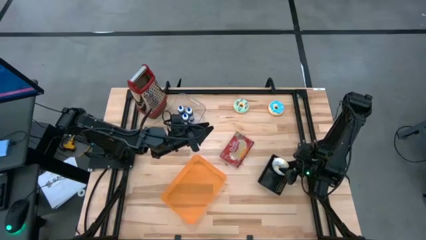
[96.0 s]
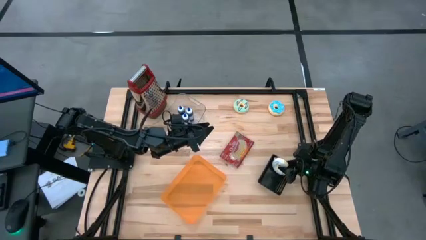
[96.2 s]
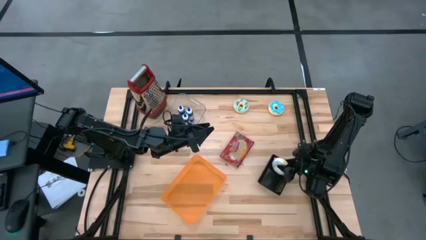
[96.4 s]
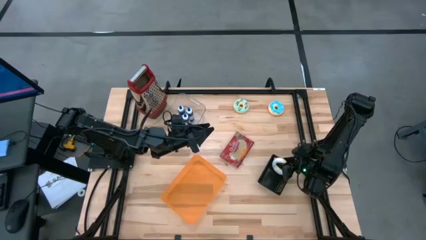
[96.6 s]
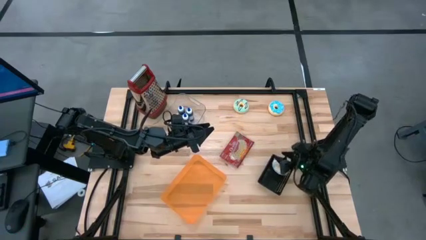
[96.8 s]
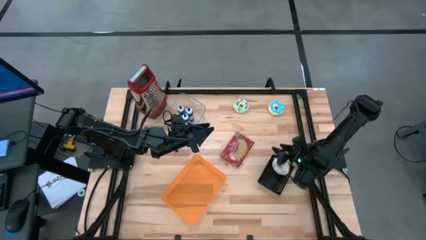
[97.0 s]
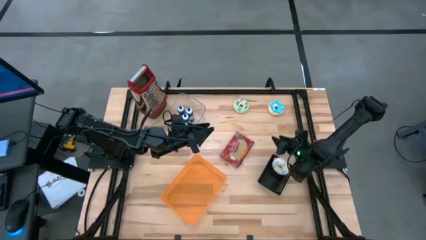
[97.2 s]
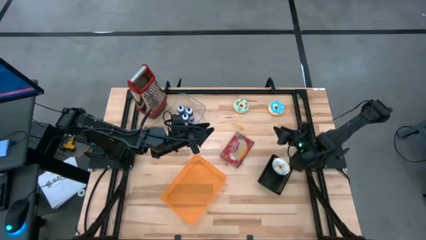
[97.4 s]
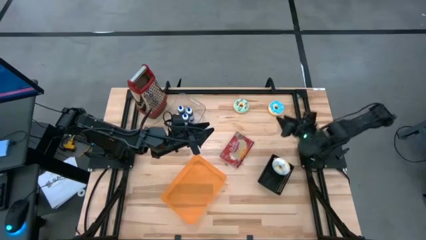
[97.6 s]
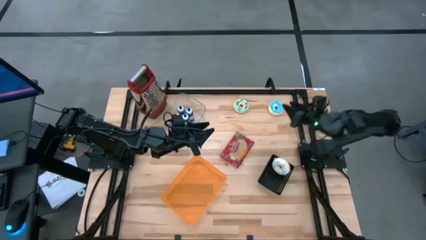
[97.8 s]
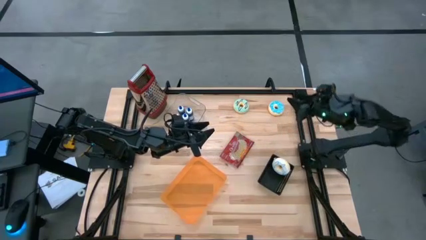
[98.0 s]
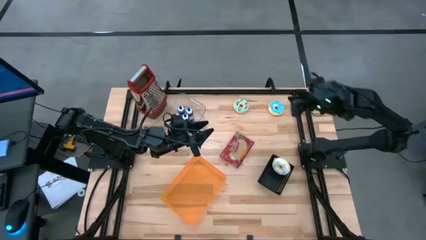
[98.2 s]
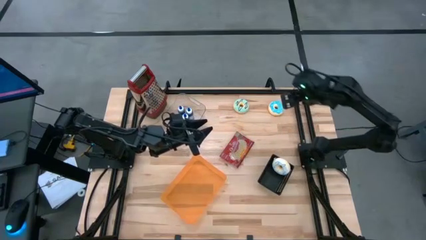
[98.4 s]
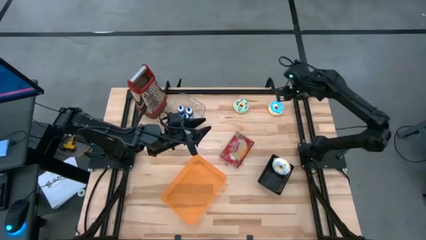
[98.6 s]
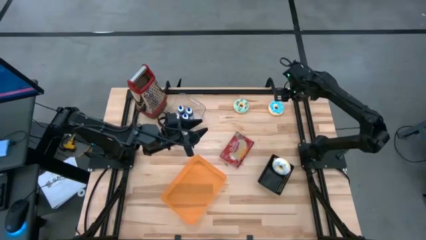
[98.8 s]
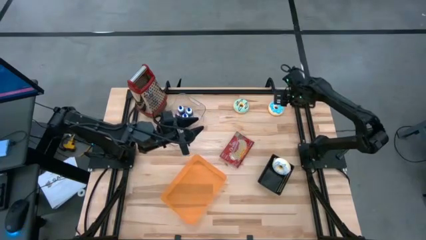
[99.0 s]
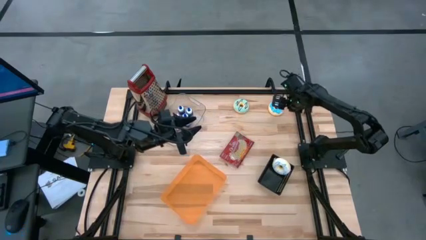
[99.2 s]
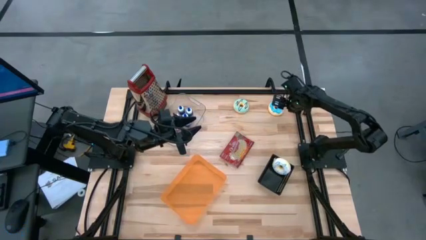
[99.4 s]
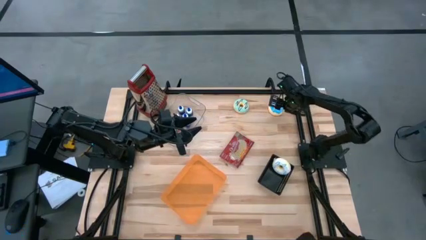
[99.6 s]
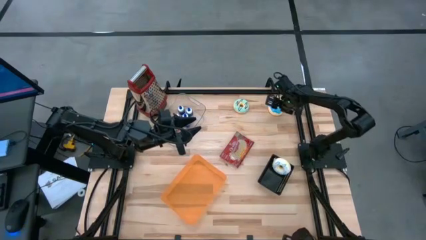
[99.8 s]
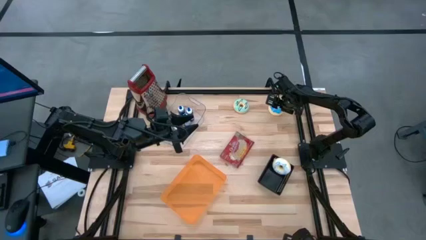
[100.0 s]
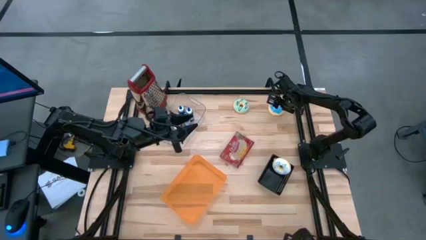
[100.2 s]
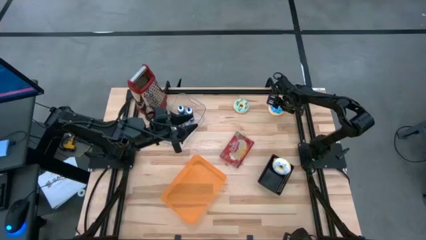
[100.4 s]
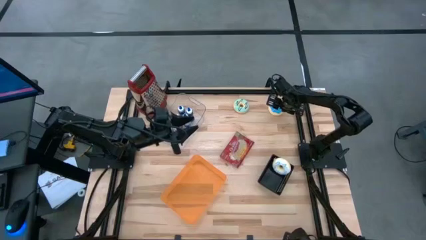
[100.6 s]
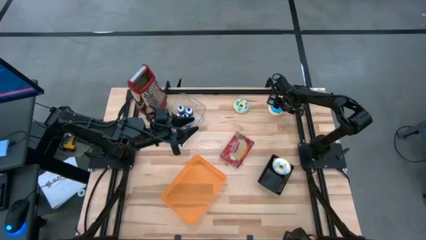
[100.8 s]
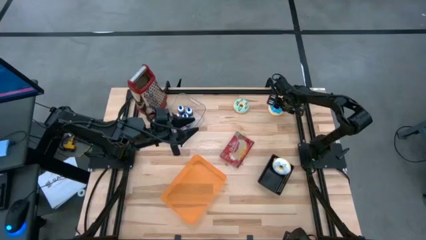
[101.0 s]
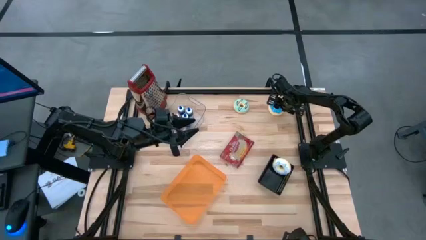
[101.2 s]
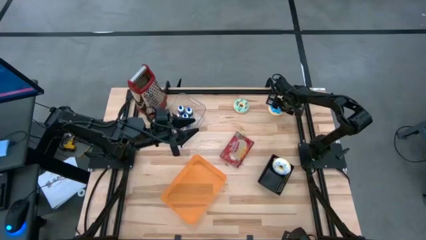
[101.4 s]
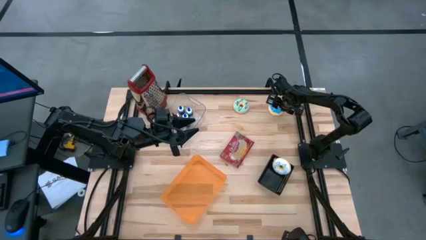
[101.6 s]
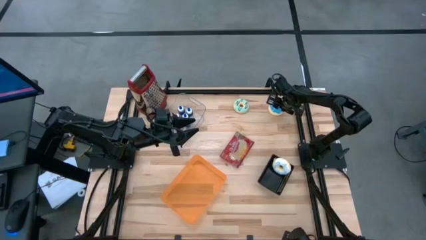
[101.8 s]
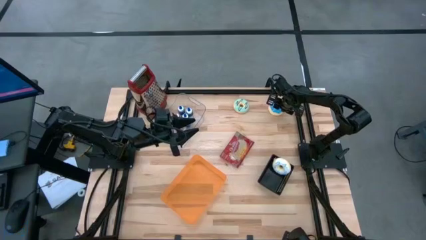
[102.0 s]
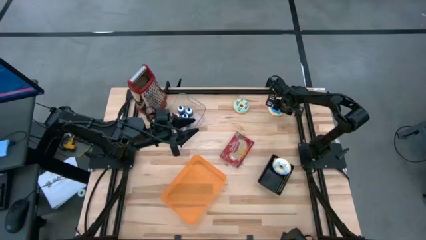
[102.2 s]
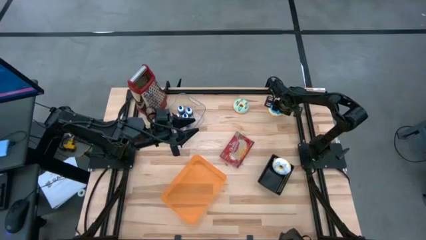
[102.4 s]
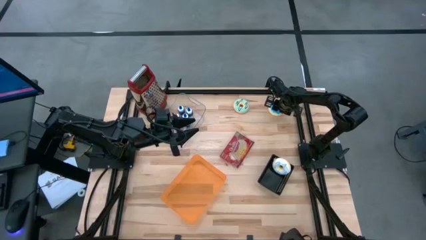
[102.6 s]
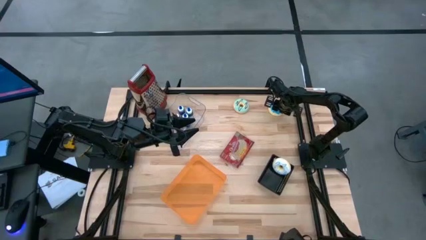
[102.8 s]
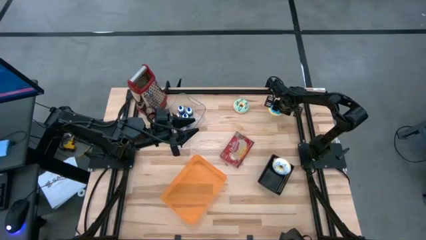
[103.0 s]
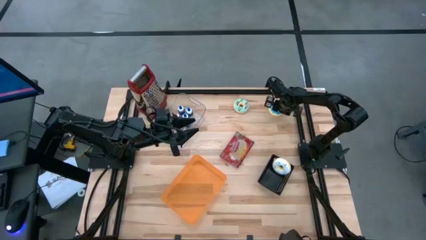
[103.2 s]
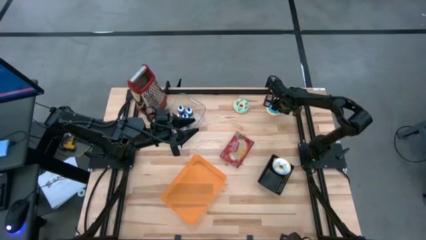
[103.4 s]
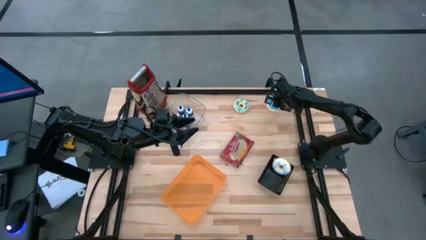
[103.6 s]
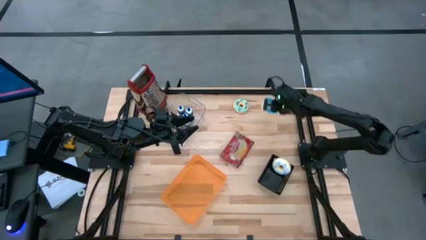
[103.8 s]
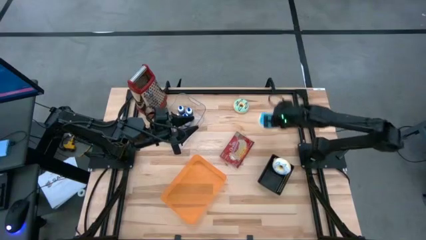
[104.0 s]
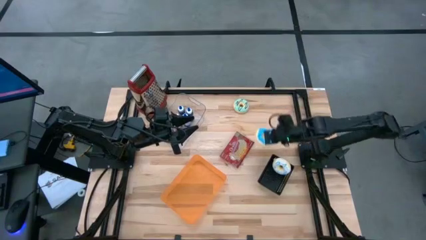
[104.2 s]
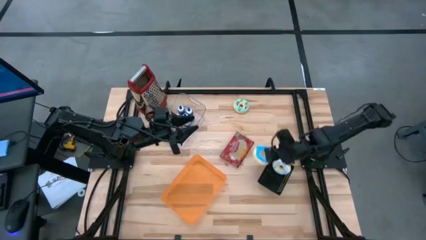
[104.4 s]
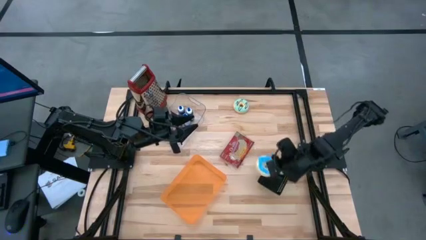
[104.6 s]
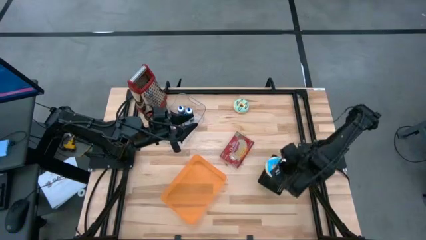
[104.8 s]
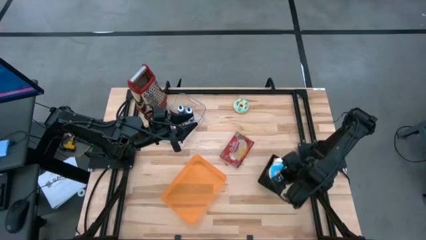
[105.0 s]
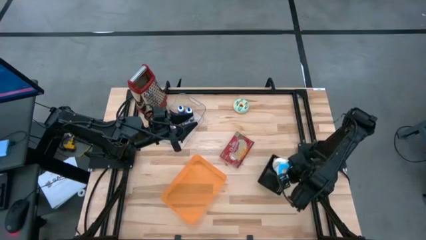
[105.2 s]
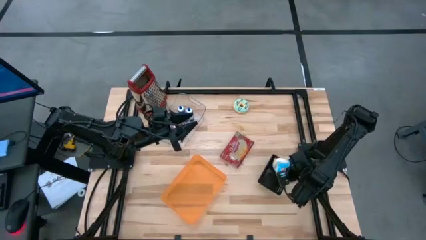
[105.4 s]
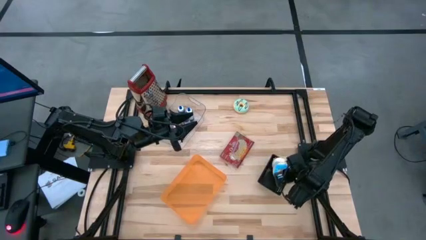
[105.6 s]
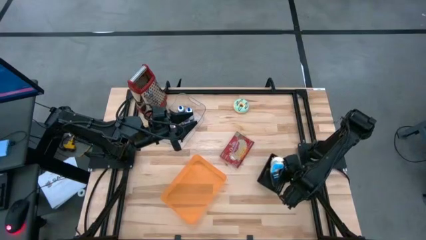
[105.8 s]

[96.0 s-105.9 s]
Put the light blue donut into the black basket

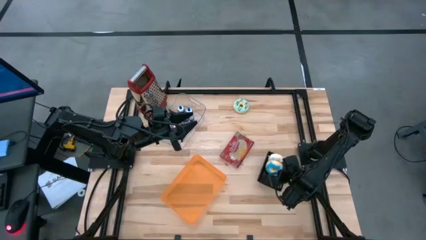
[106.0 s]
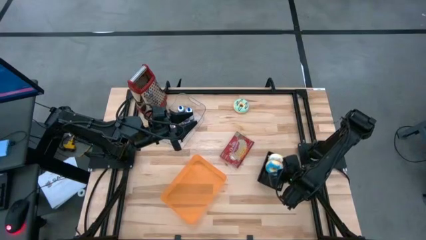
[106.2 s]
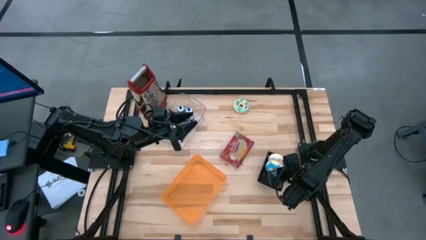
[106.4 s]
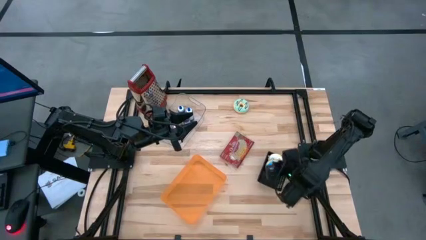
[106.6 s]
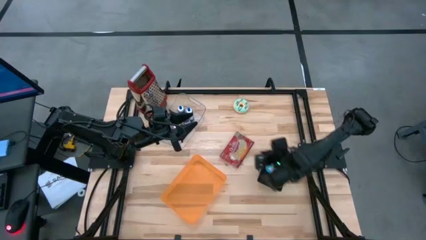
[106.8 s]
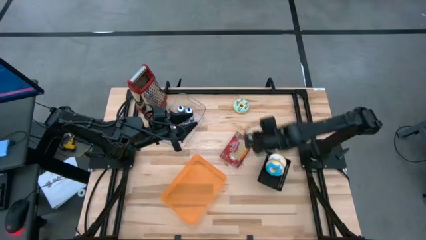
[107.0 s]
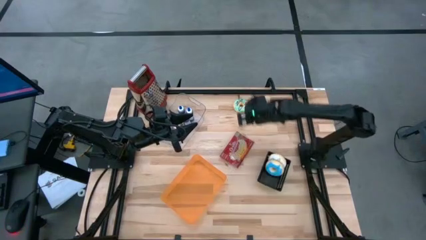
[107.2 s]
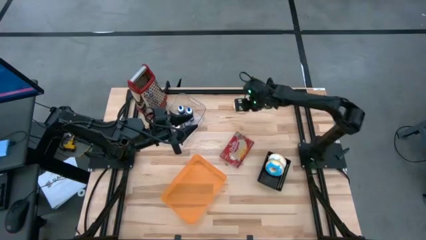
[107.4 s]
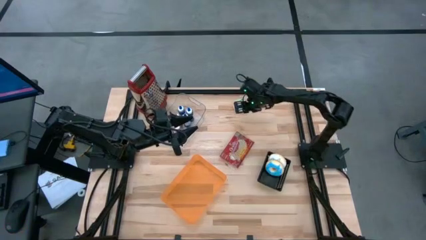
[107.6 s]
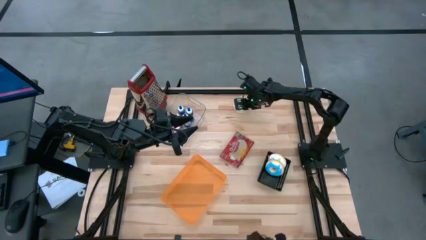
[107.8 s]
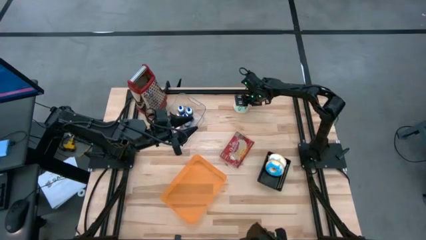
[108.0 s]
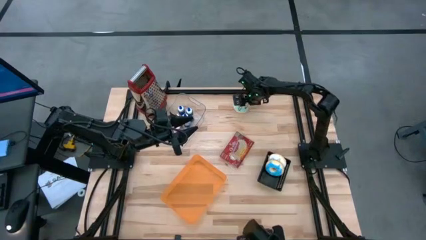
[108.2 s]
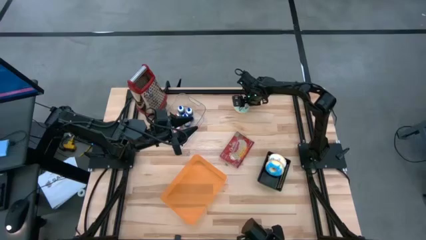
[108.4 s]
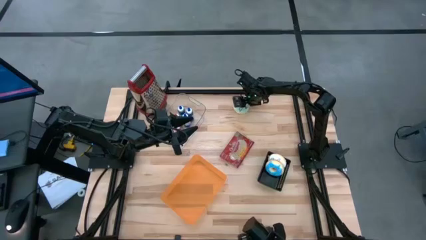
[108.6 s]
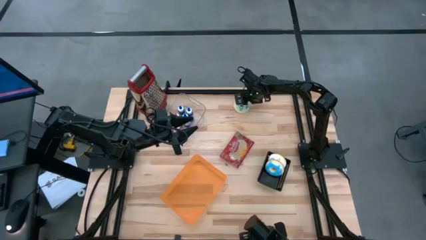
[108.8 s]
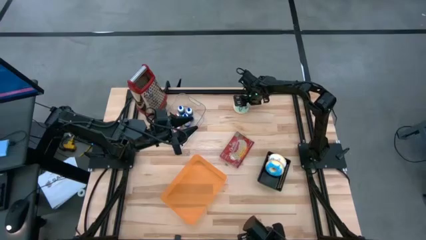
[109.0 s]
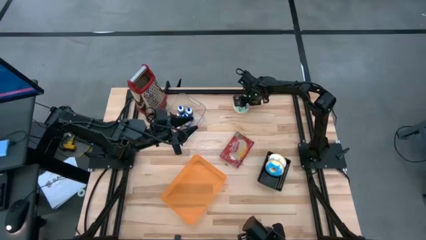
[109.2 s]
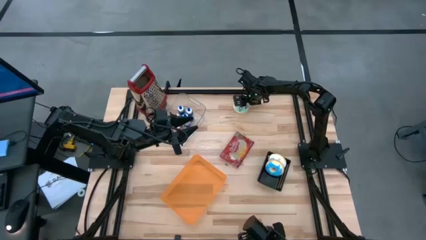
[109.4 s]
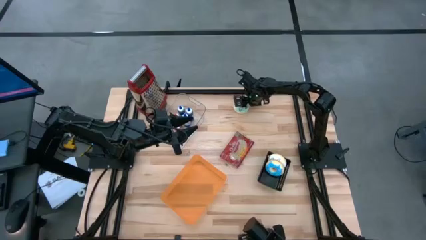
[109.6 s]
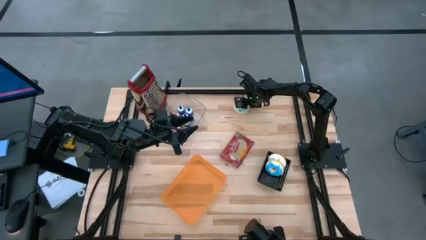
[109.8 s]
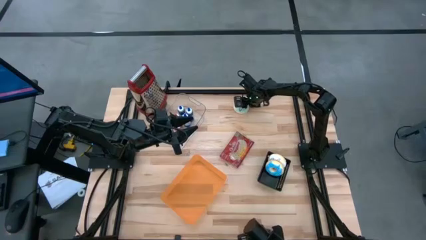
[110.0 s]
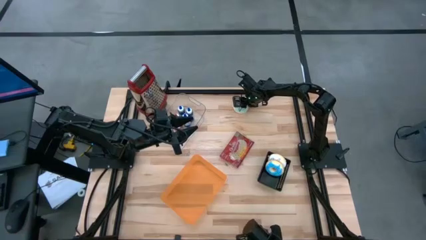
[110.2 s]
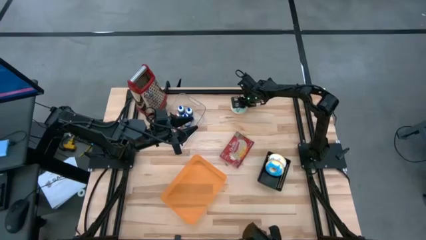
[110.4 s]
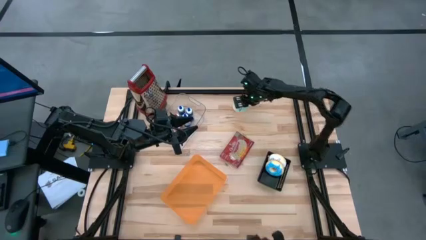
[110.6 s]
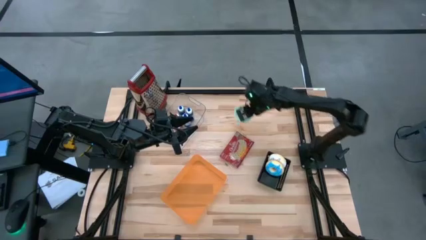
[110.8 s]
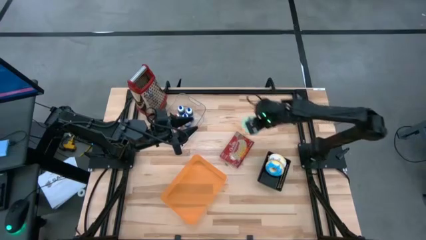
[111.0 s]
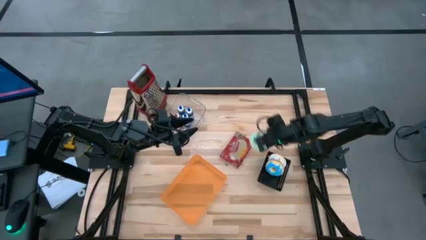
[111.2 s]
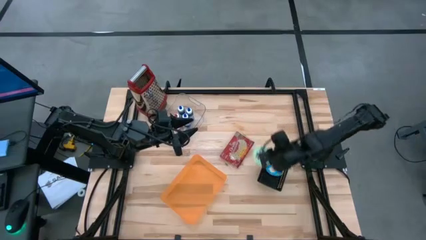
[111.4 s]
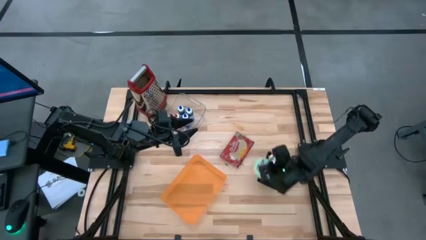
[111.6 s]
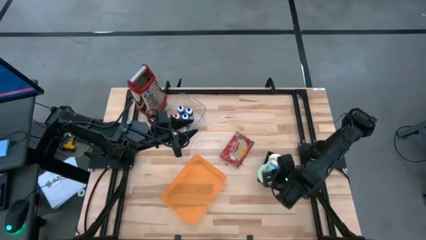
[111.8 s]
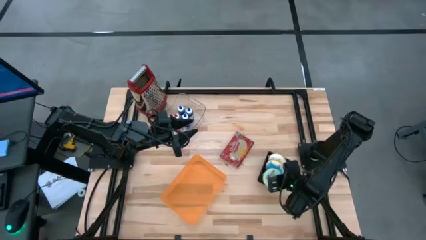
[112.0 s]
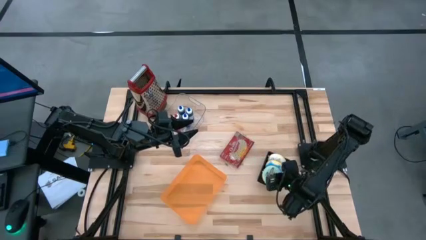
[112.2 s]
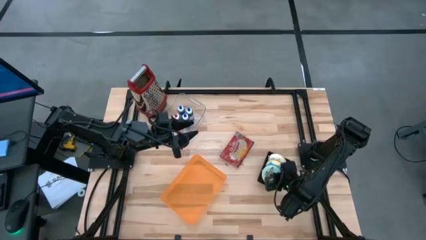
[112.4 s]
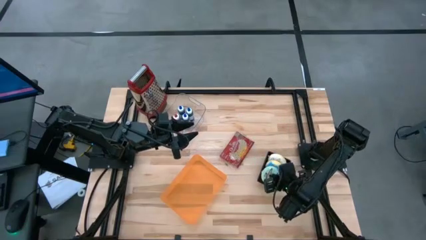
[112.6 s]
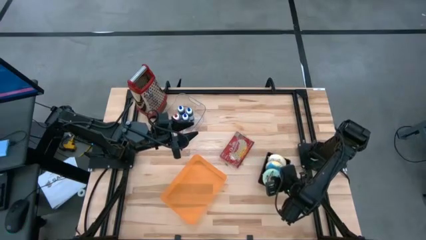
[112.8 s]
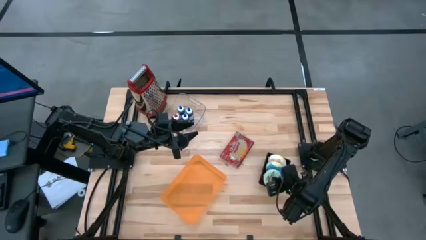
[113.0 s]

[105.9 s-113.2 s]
Put the light green donut into the black basket
